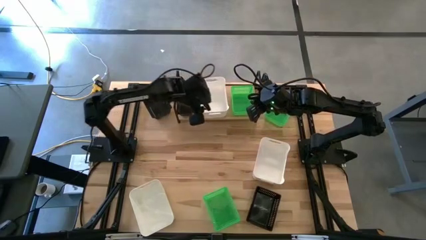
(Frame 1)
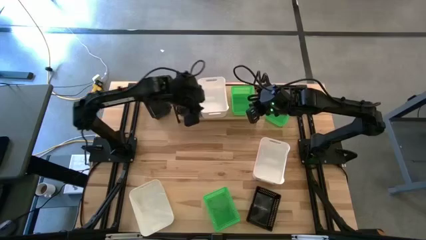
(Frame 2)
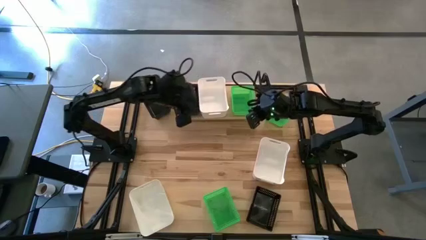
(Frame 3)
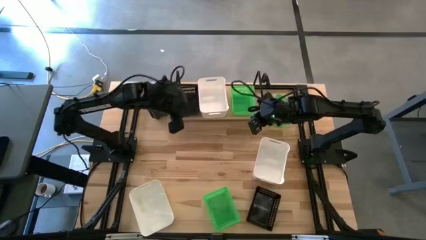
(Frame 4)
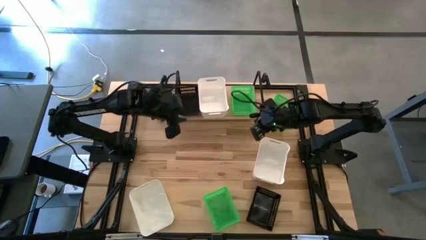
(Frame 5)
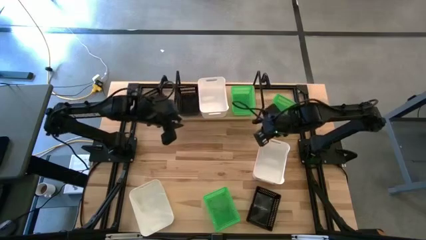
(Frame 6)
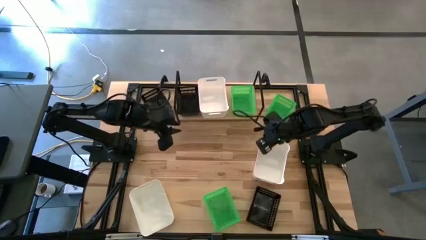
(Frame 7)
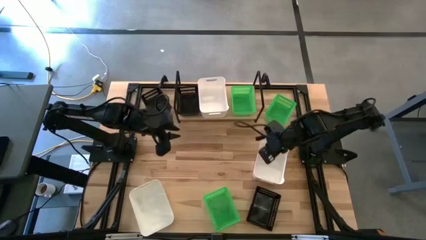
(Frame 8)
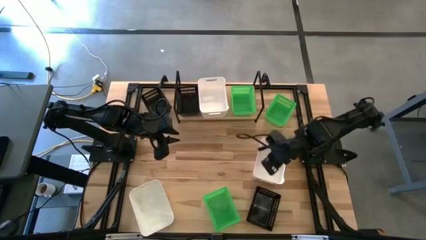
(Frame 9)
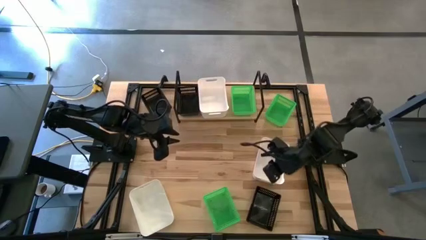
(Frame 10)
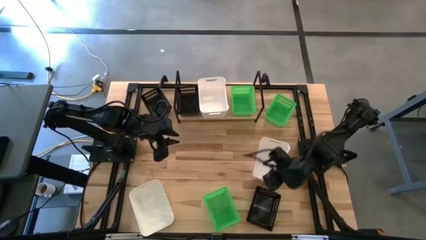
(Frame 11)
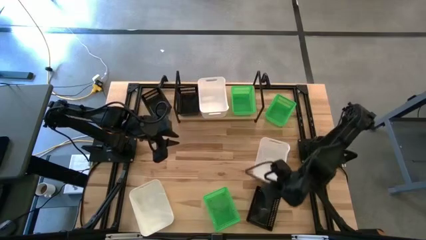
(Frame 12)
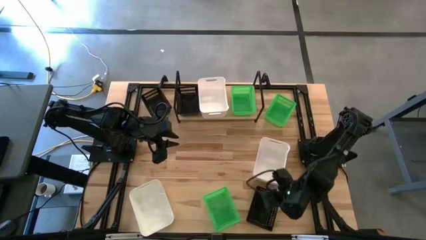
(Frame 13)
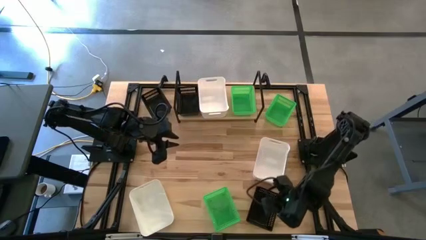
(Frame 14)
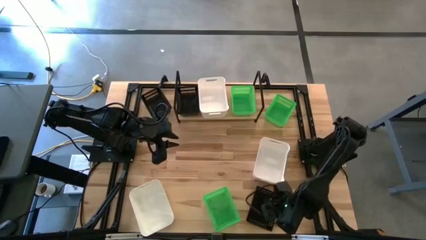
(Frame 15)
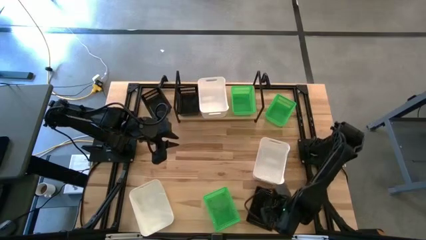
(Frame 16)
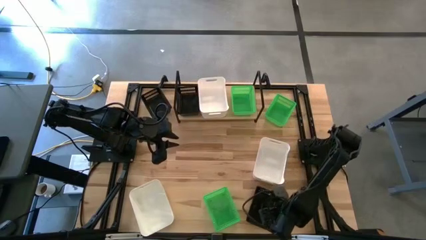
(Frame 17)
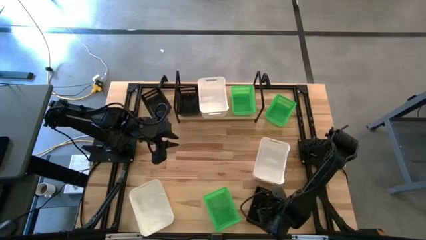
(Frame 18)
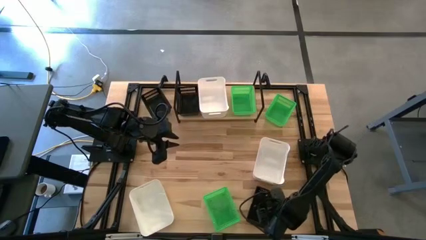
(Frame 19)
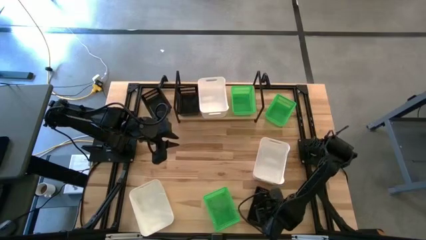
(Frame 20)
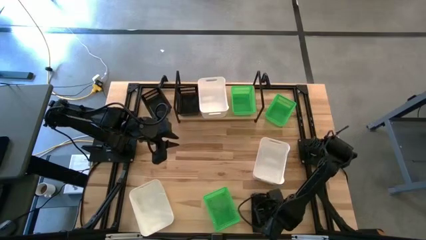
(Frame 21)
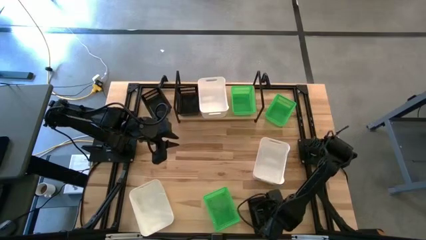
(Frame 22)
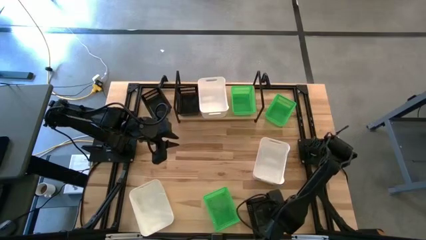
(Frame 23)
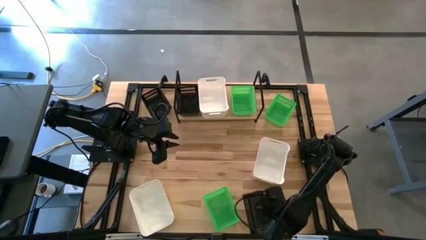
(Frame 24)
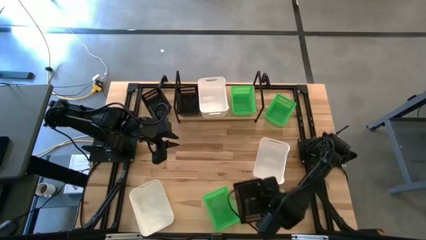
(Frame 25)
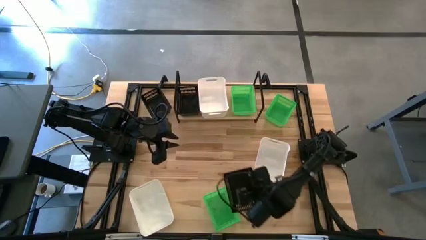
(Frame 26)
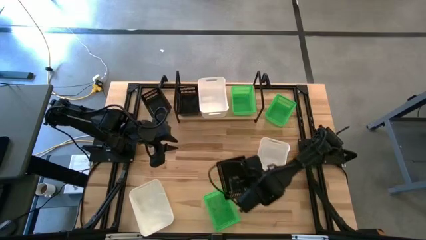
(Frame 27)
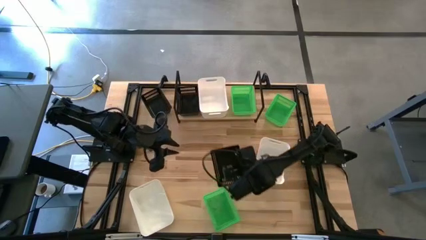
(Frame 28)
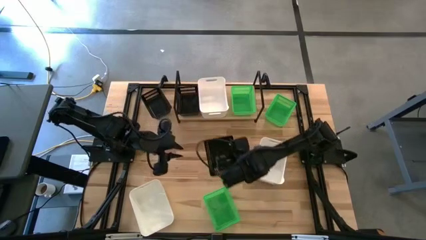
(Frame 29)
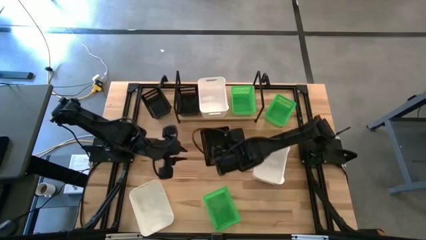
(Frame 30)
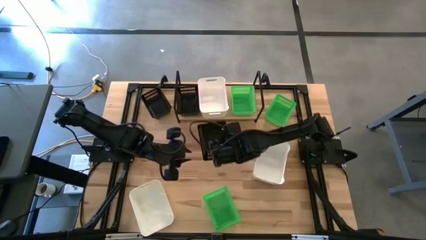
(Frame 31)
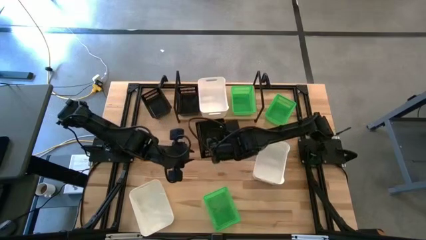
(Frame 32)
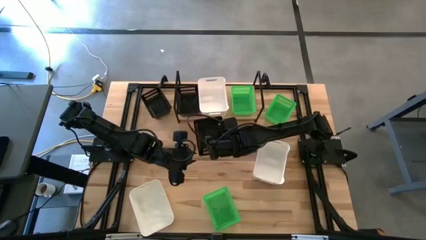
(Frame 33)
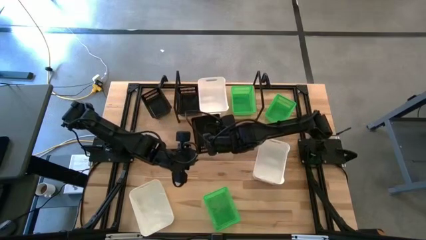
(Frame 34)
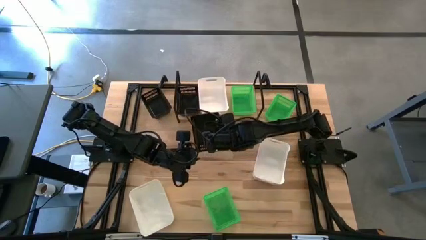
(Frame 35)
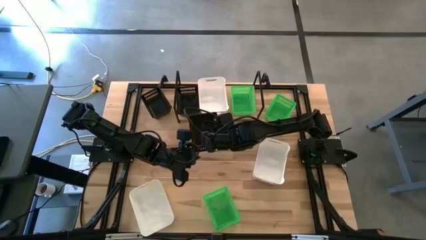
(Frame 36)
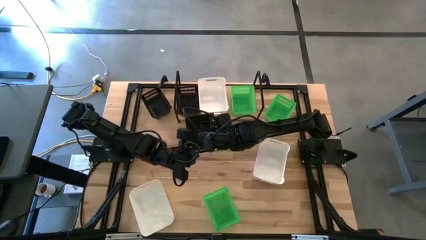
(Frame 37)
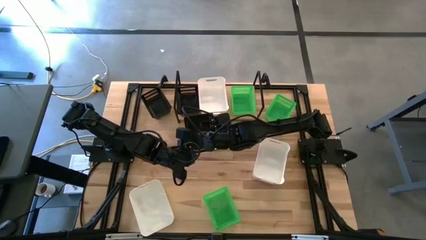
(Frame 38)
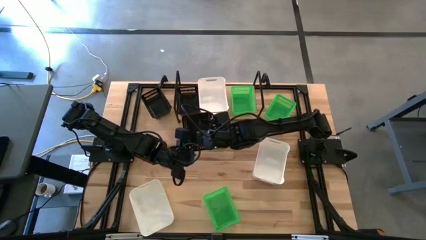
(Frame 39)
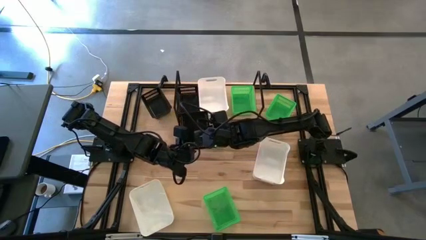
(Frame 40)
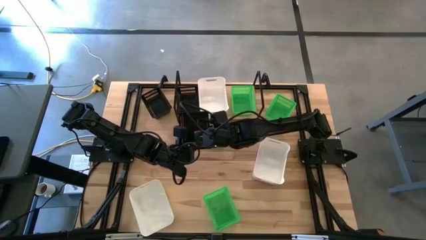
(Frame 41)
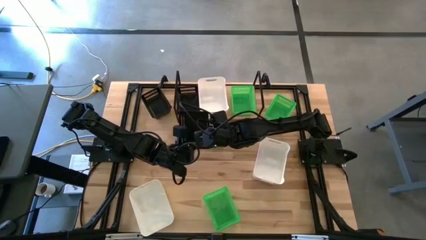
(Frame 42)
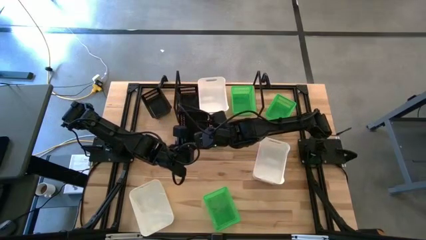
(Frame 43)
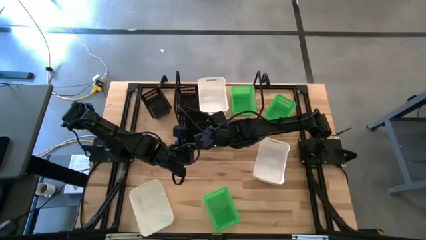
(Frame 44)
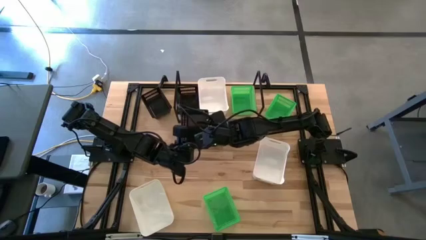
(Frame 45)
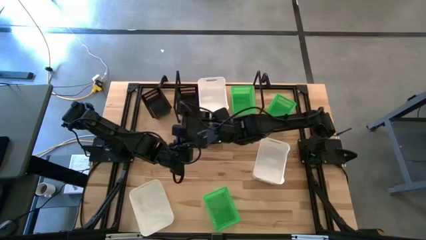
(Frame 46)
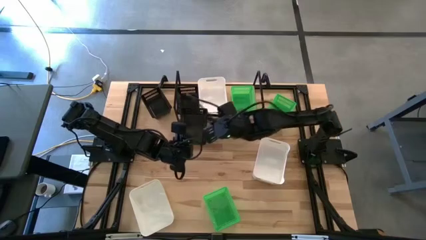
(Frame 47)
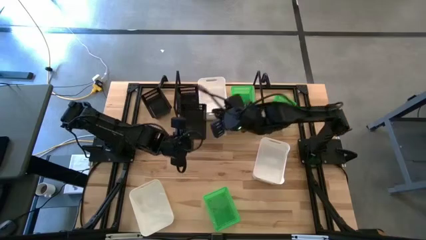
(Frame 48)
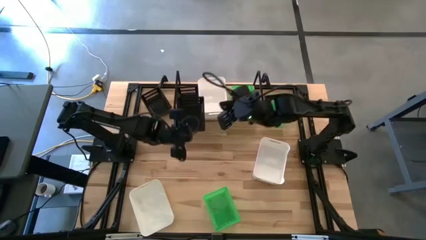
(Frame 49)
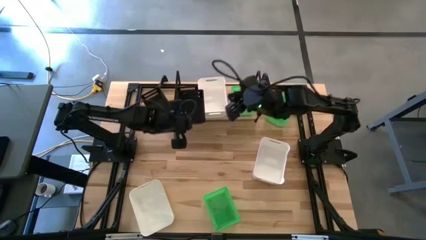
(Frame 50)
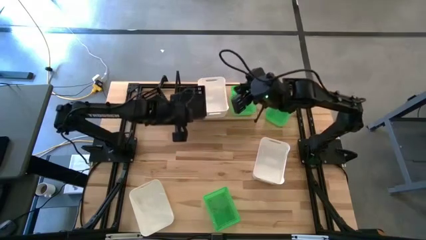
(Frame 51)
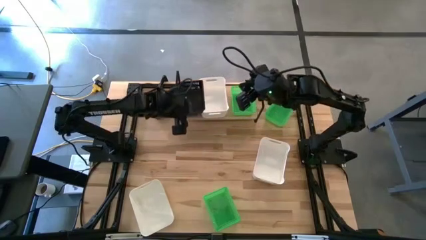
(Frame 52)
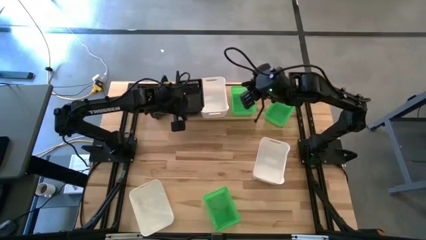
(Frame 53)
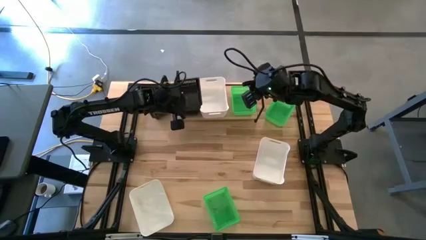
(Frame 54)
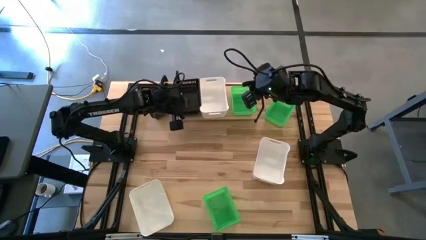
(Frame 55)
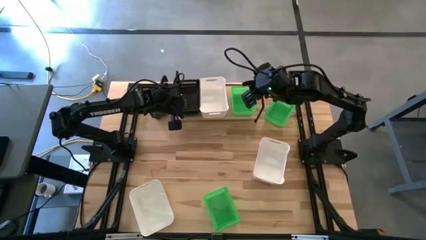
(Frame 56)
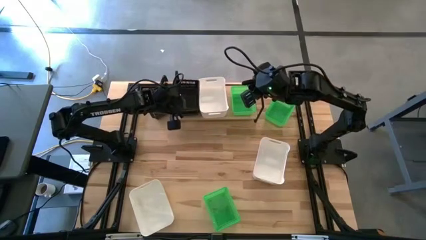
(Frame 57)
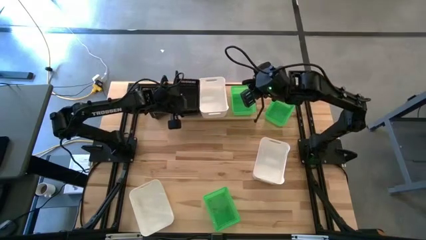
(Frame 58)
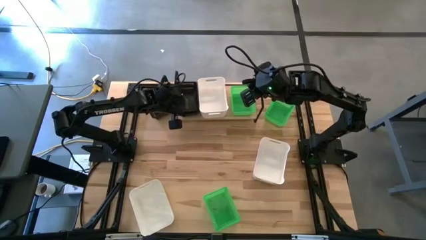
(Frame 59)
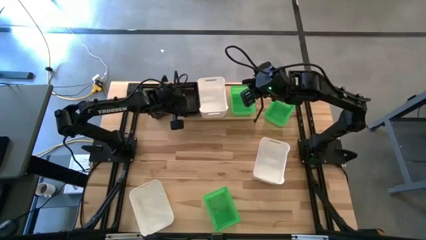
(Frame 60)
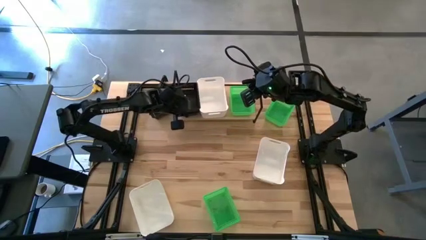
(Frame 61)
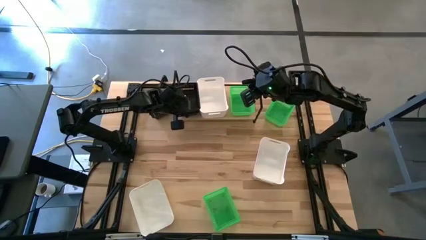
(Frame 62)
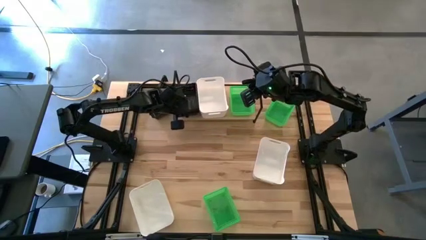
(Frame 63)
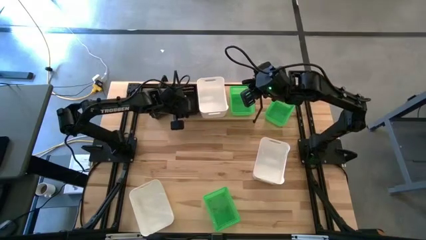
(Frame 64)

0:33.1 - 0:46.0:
Task: Stack baskets on shelf by color
Stack the bottom black bin on top of the black bin on the shelf
